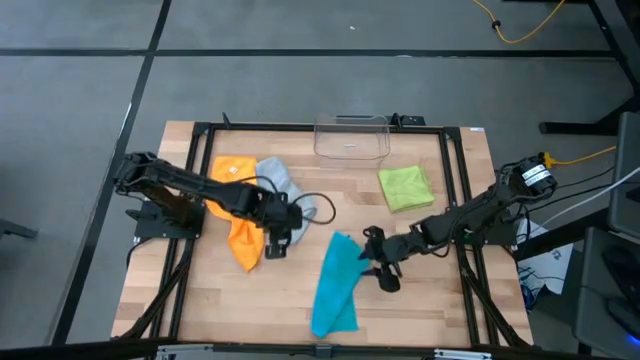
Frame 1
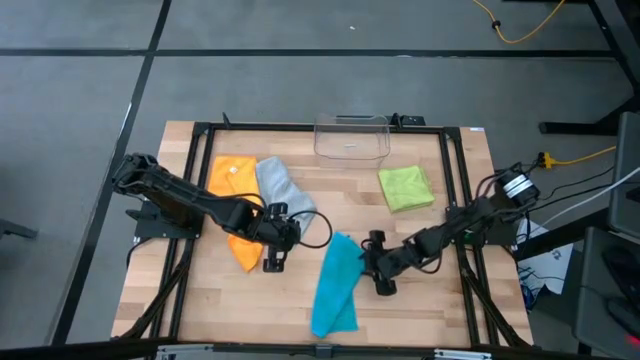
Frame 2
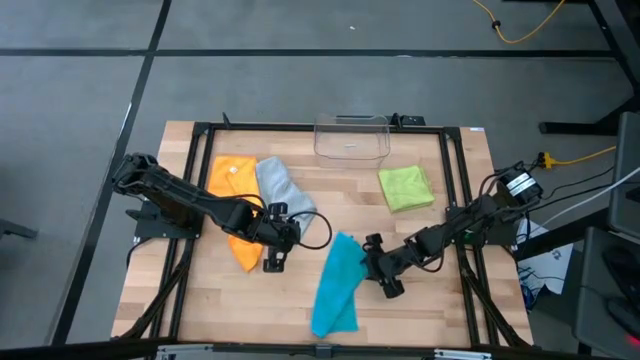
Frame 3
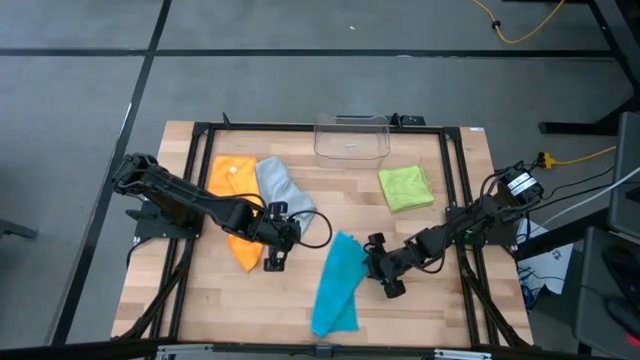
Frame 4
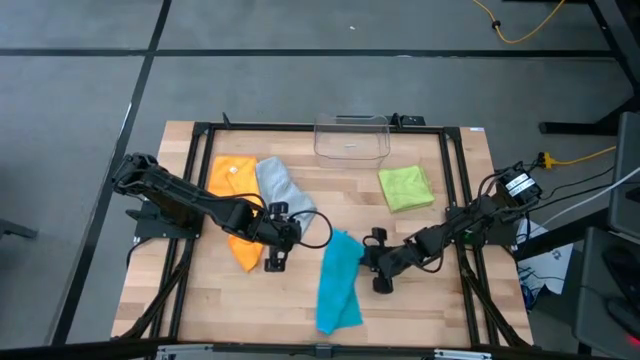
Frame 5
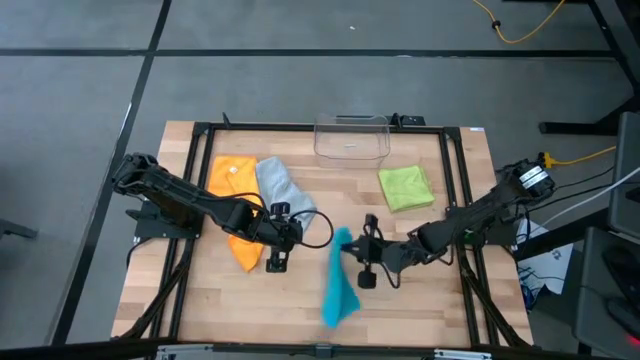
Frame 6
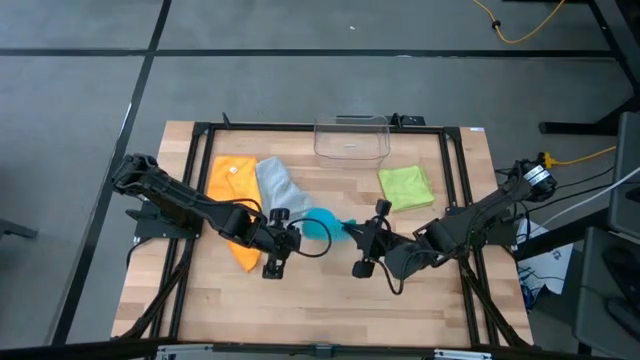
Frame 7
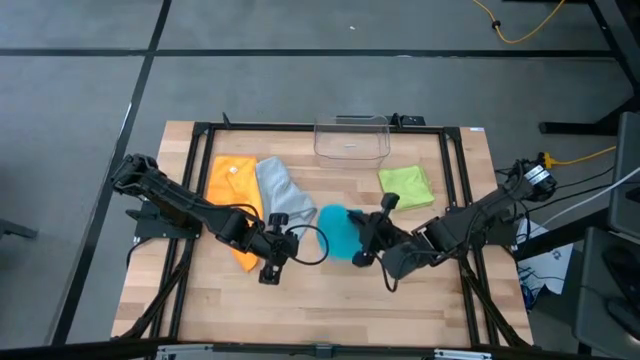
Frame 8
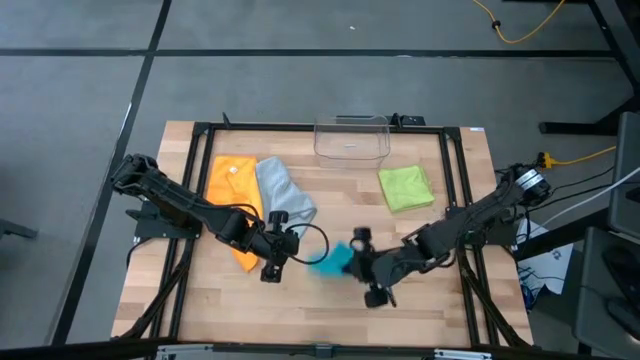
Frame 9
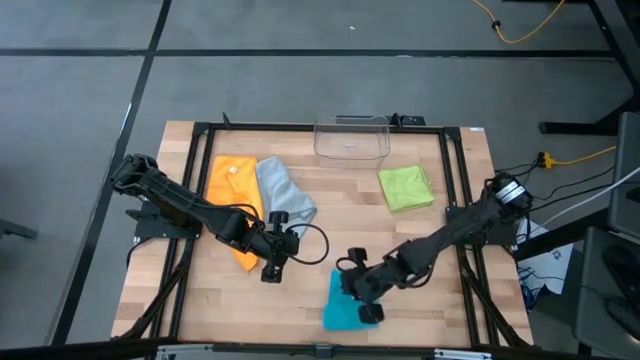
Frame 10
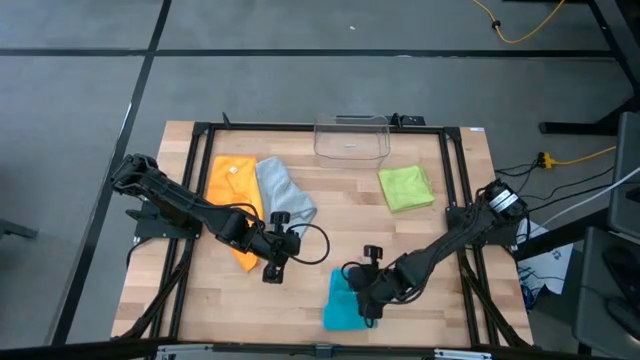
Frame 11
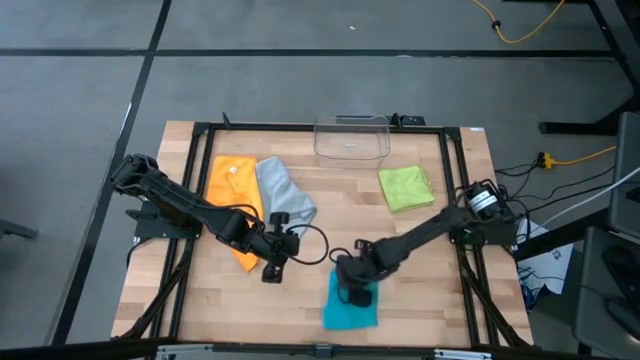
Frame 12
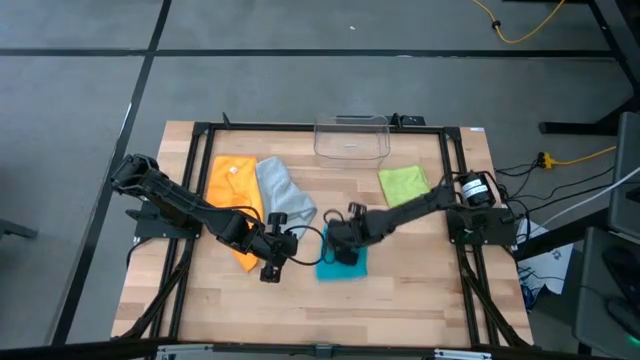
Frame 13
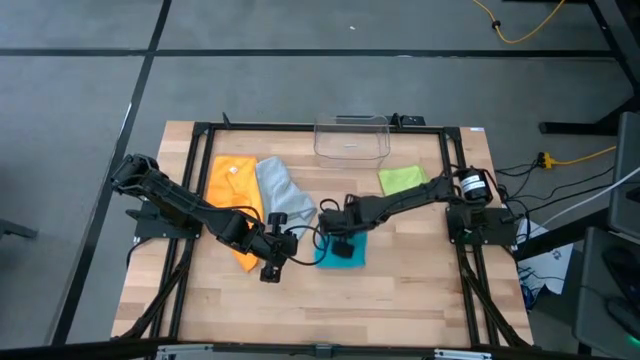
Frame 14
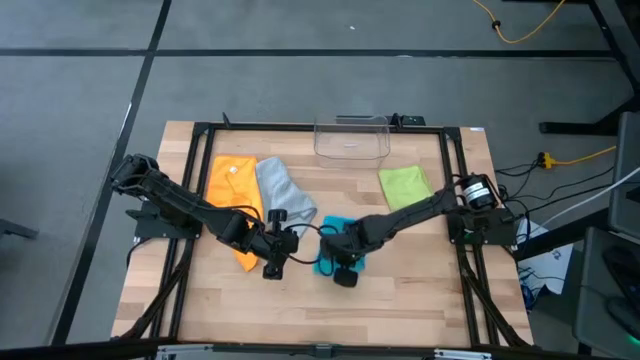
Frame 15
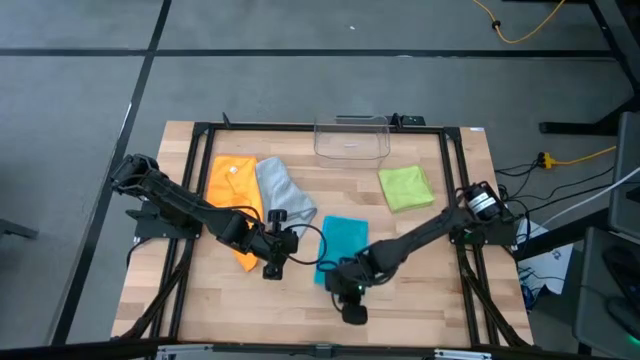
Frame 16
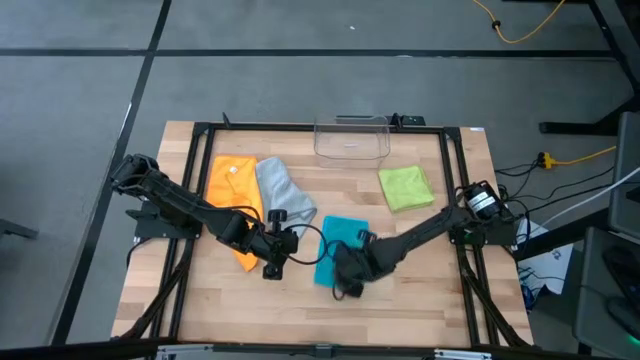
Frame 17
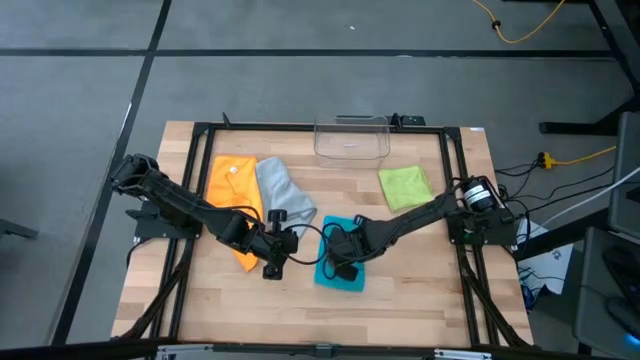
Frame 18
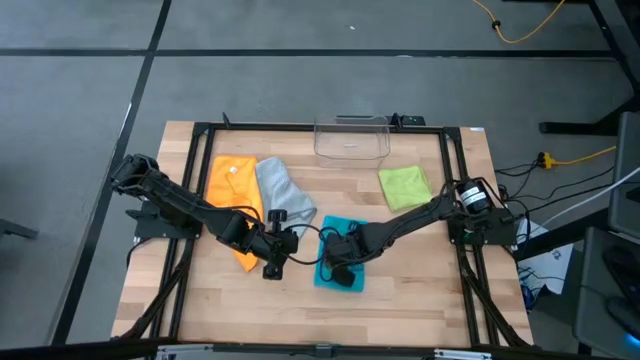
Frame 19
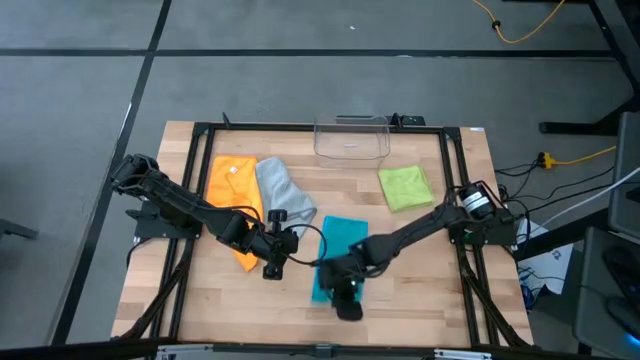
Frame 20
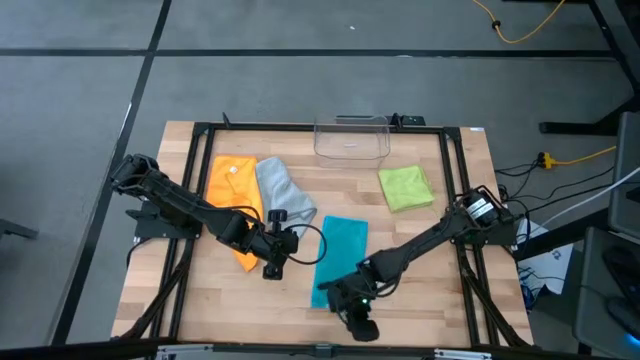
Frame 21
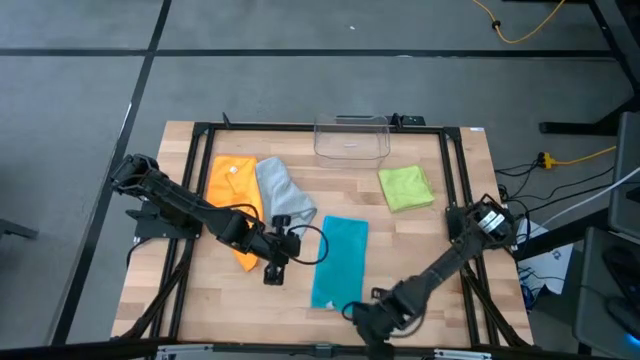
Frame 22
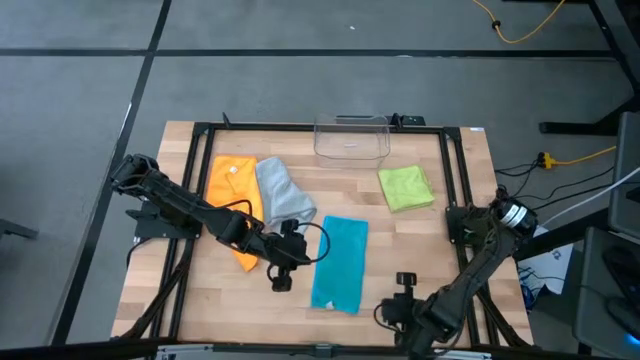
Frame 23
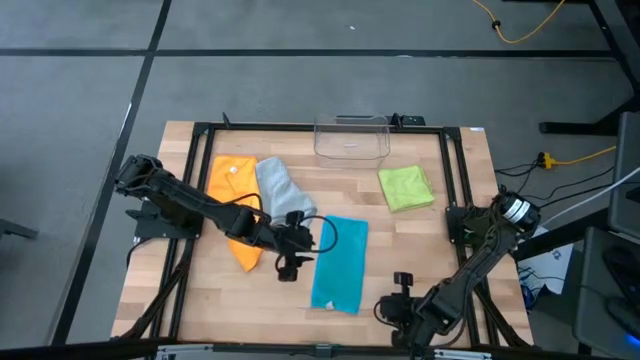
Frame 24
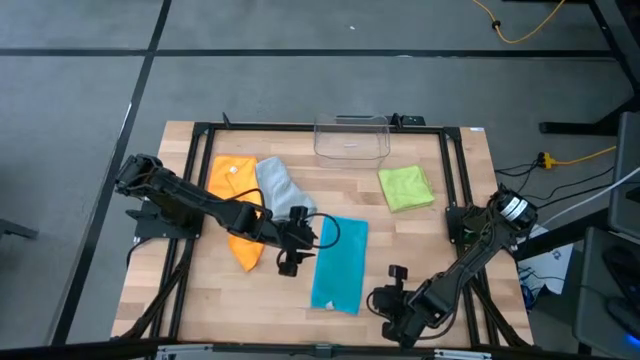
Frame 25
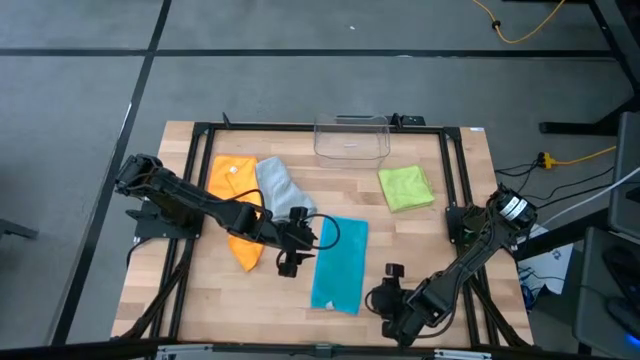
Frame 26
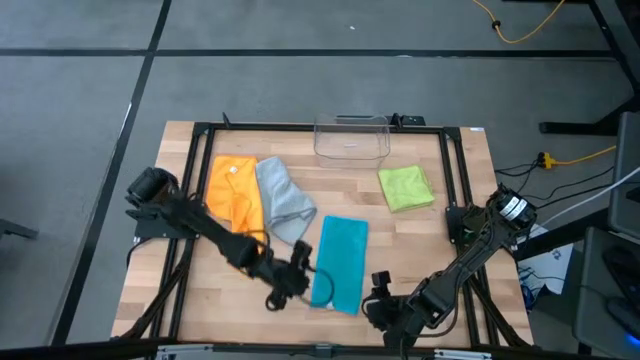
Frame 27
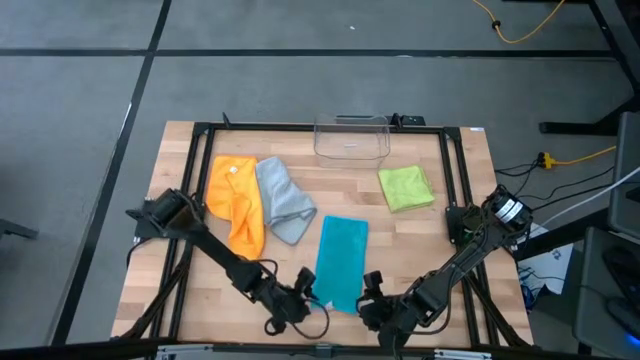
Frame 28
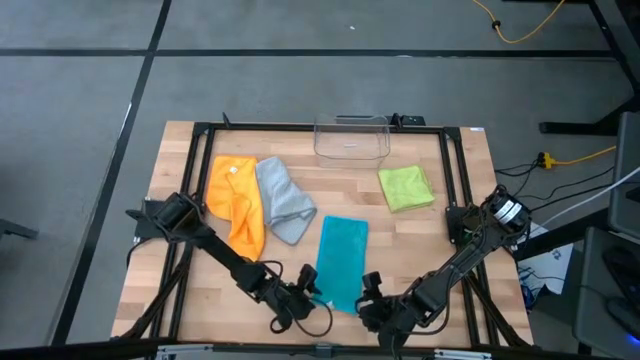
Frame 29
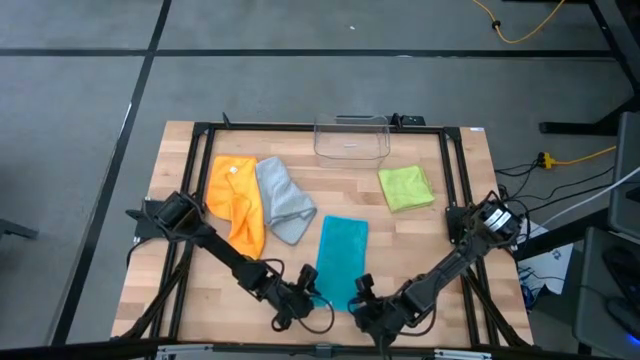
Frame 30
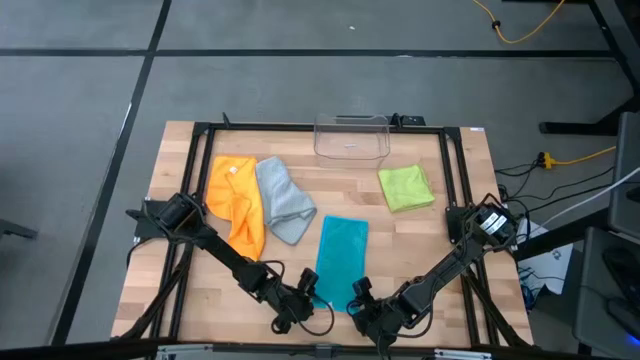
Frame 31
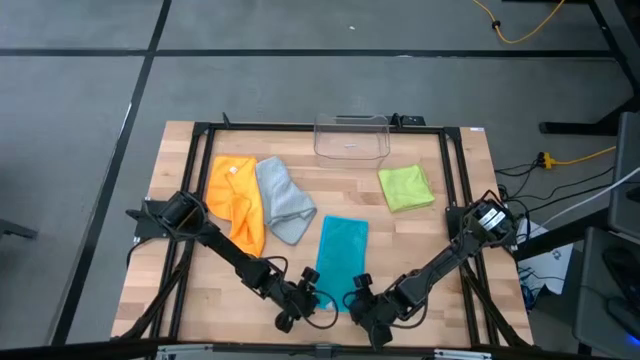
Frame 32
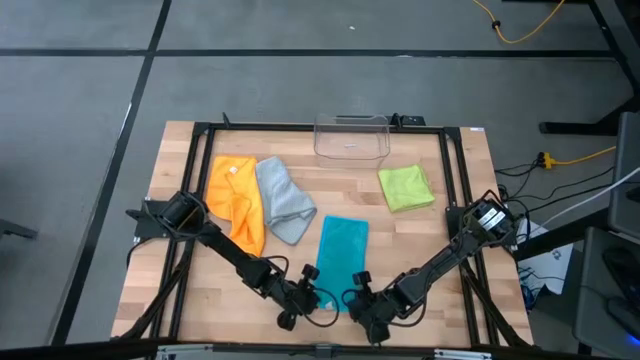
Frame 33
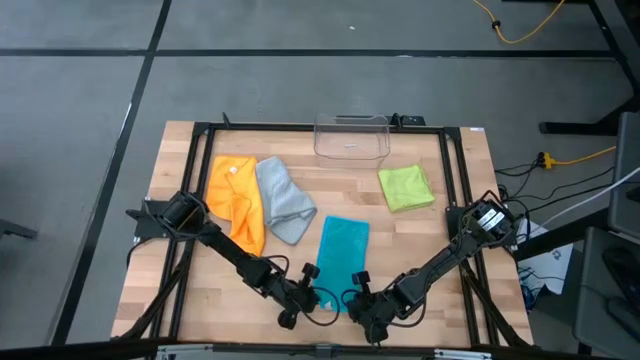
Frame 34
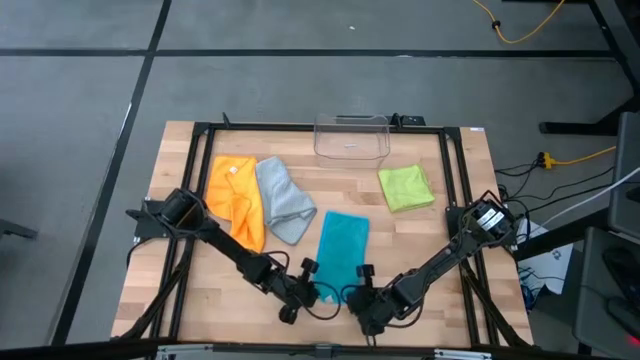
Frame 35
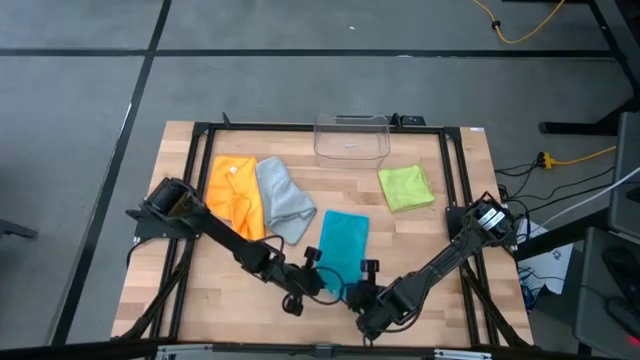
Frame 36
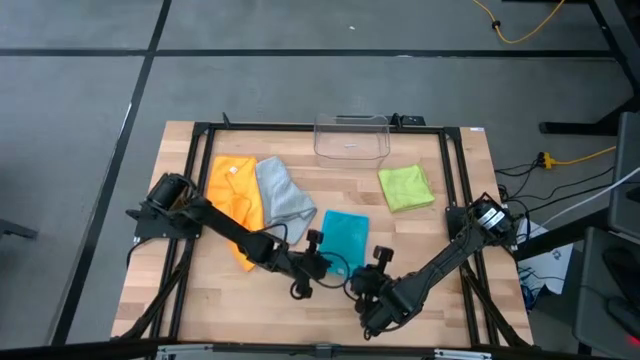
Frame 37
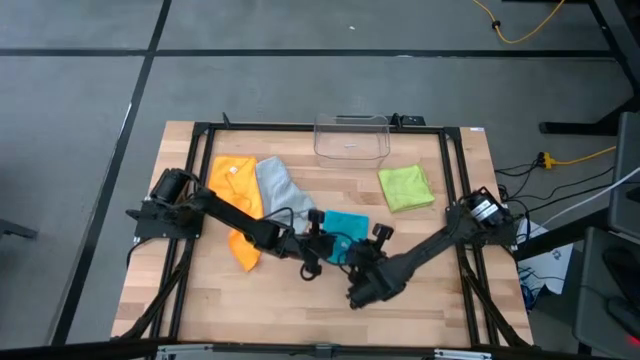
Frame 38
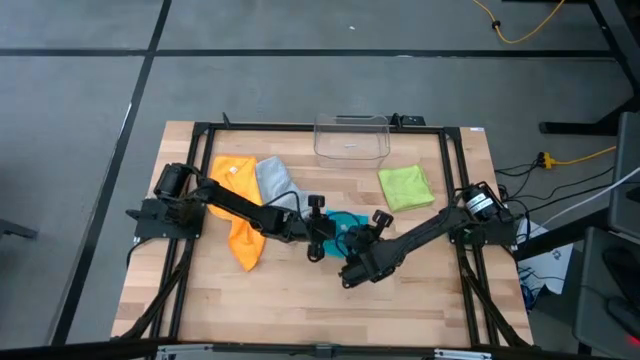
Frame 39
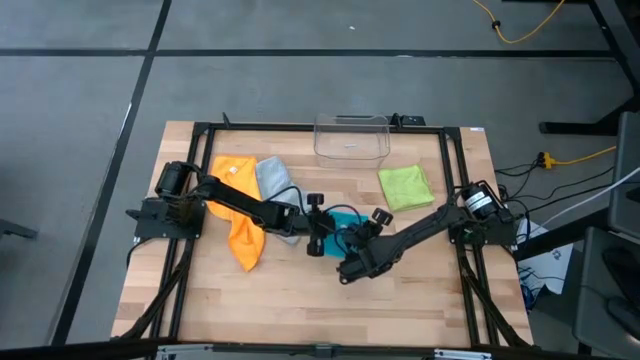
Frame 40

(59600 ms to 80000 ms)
Task: Fold microfiber towels
Fold the blue microfiber towel

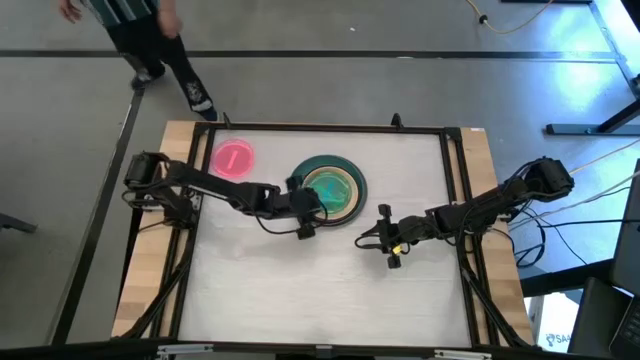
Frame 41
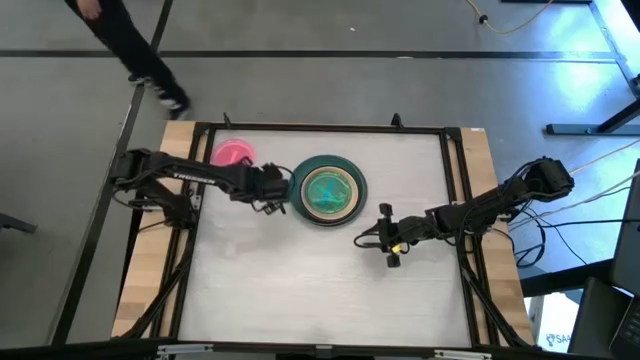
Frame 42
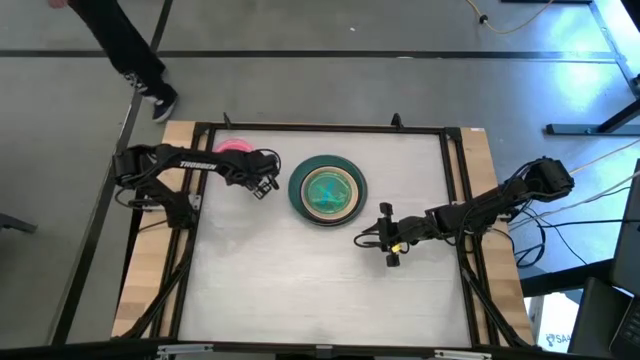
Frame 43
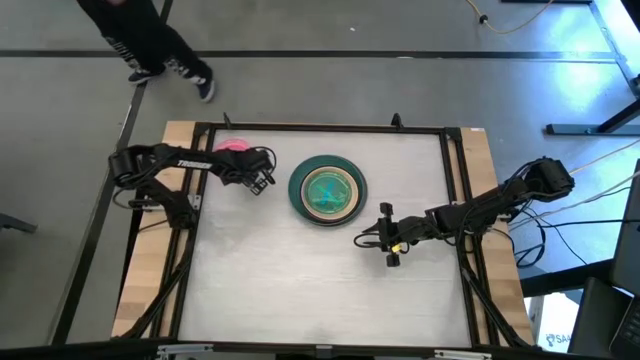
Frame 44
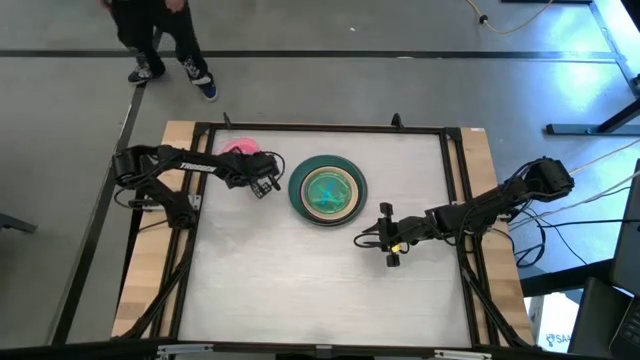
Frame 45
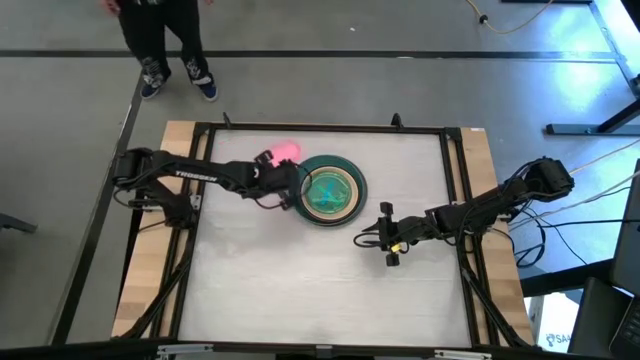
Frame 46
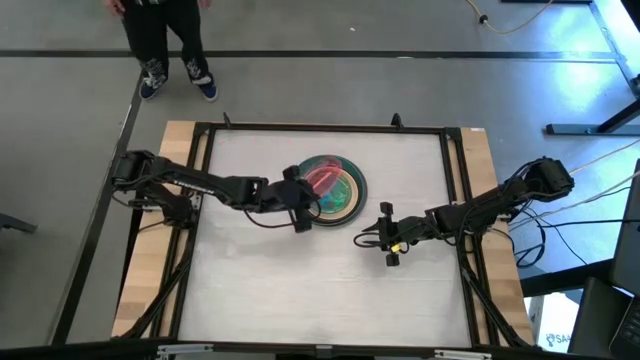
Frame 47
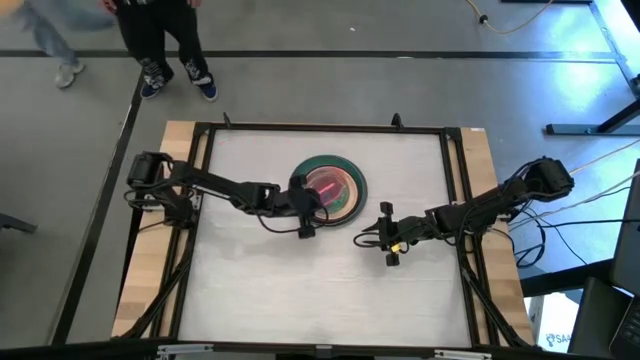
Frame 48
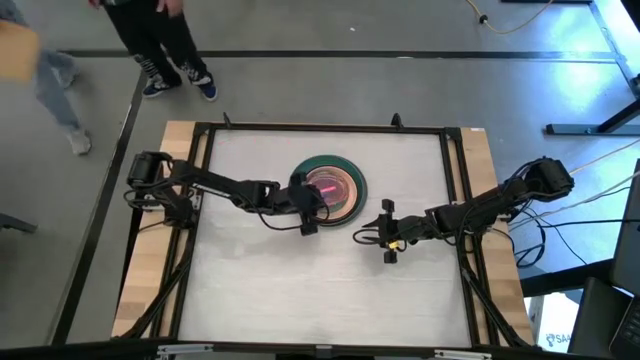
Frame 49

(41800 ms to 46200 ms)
Task: Stack plastic plates
Stack the light pink plate on the light green plate
